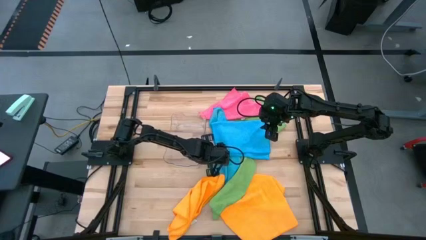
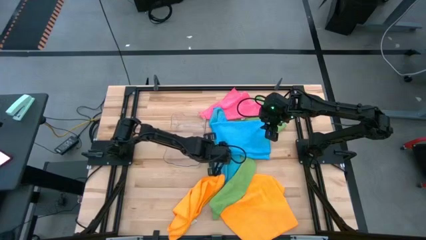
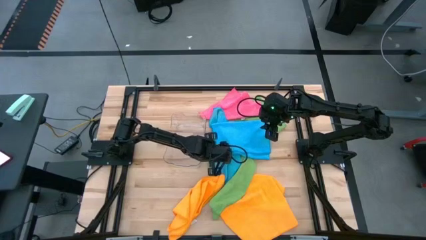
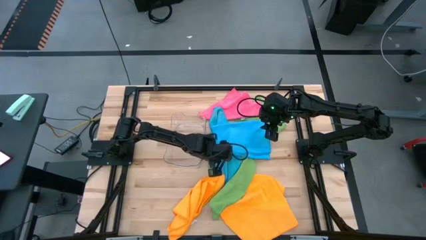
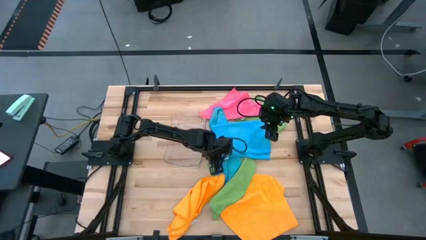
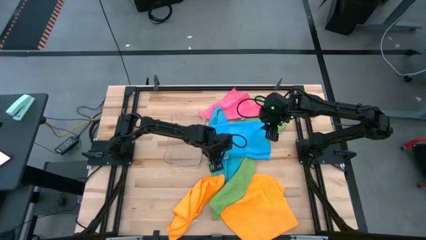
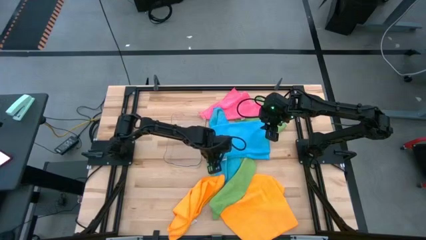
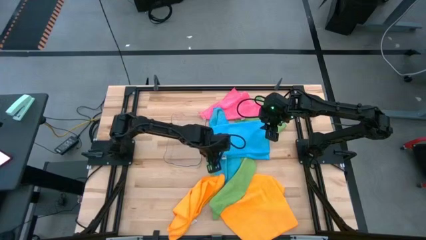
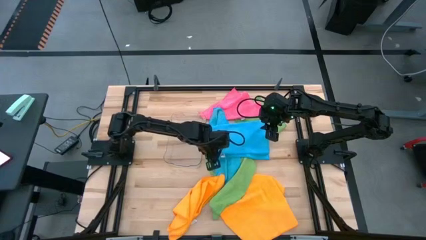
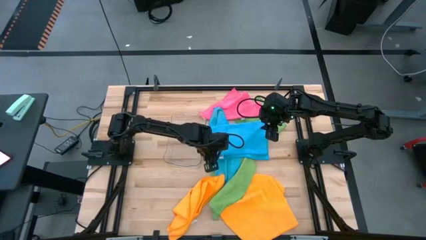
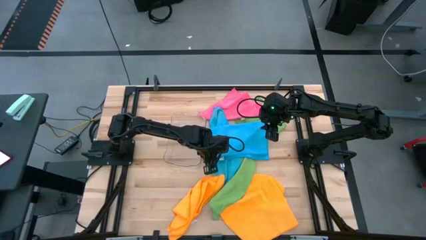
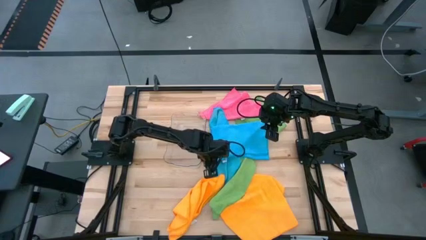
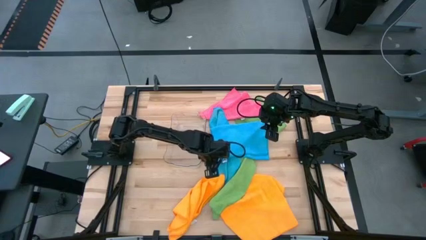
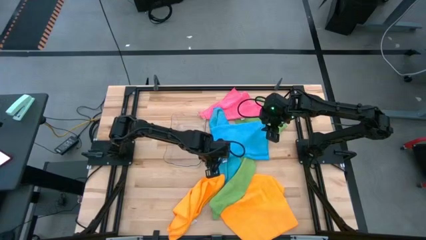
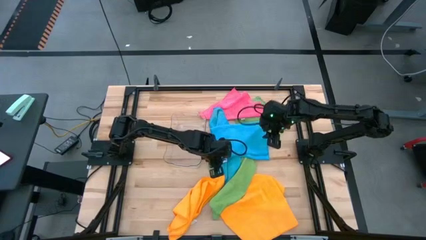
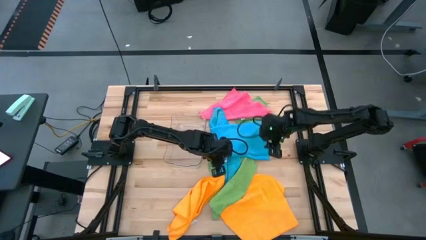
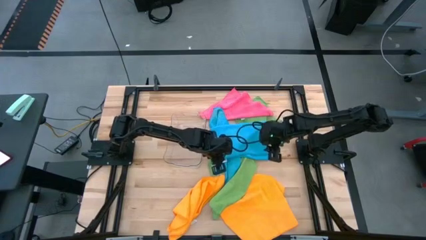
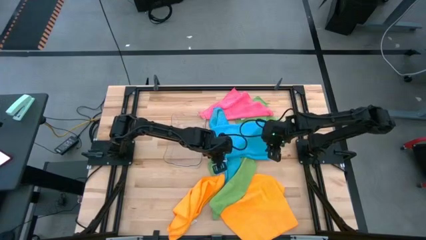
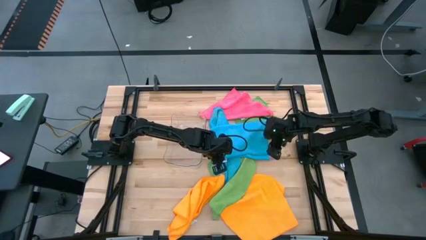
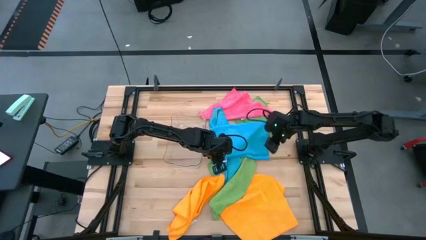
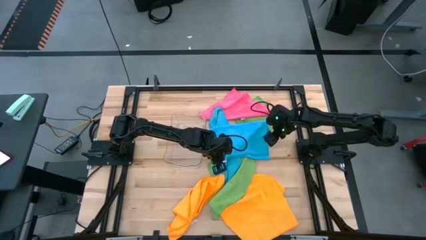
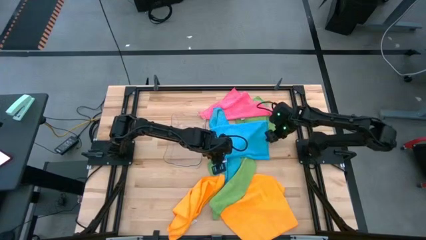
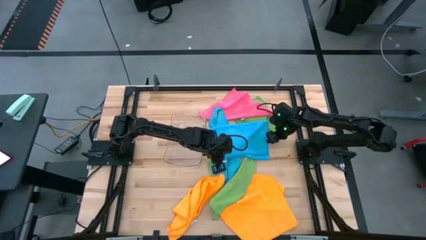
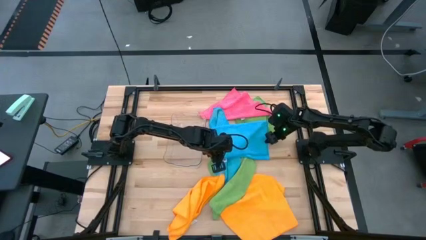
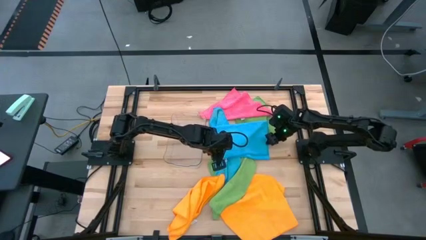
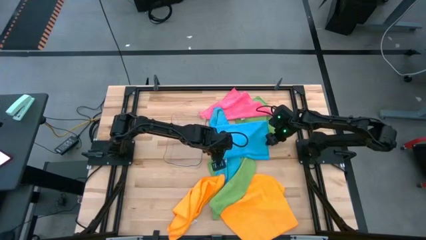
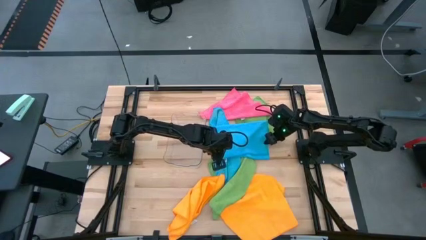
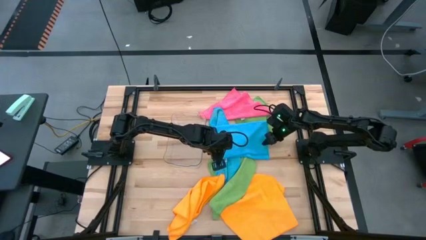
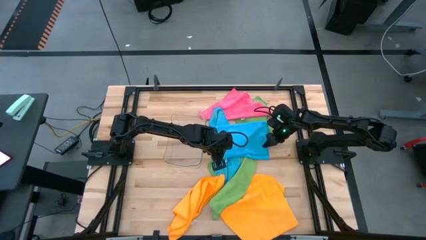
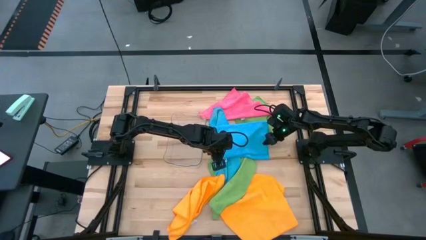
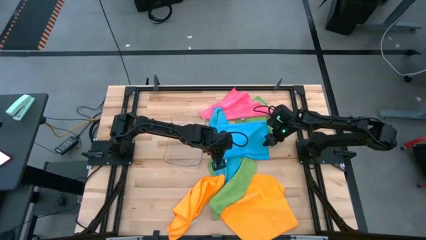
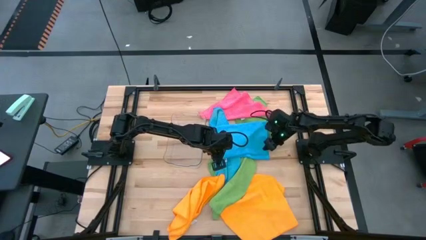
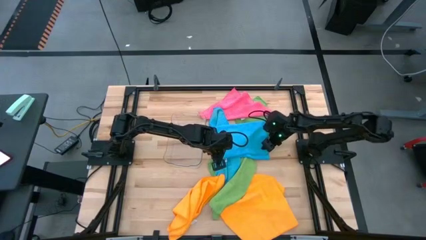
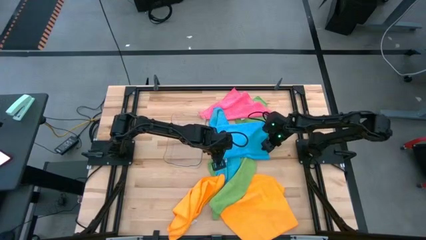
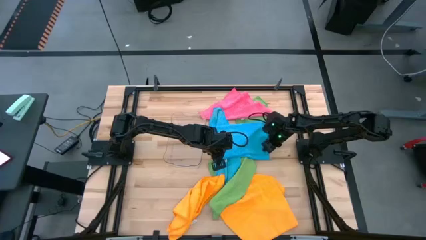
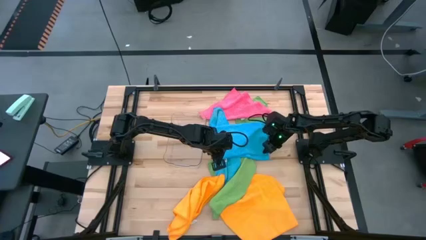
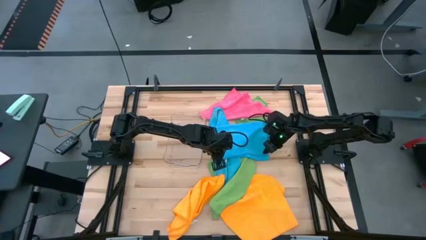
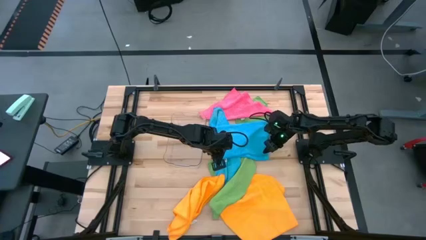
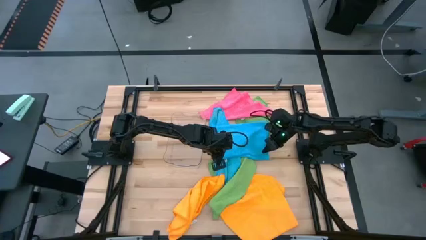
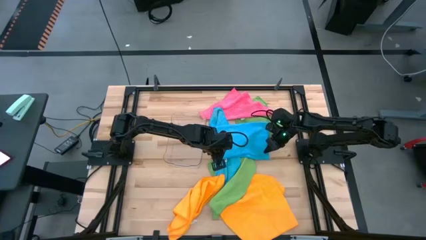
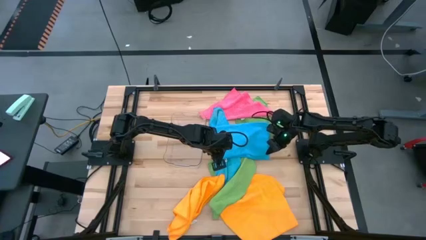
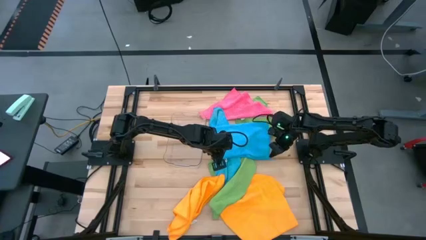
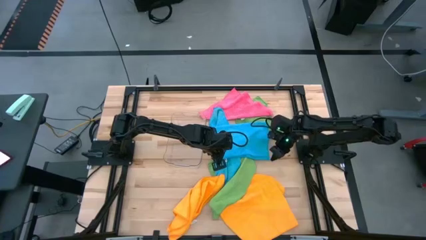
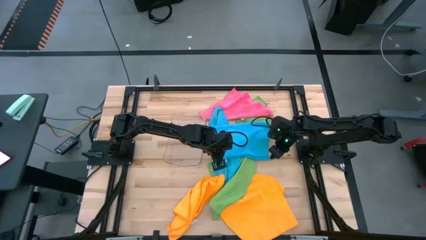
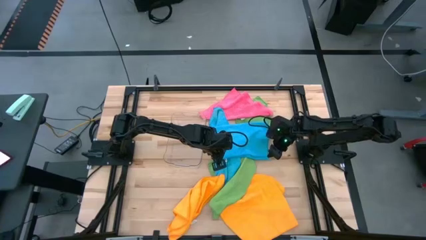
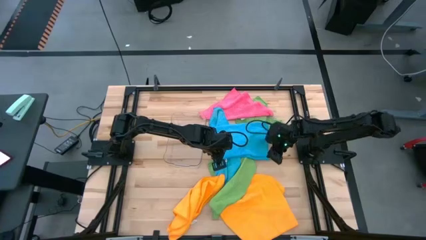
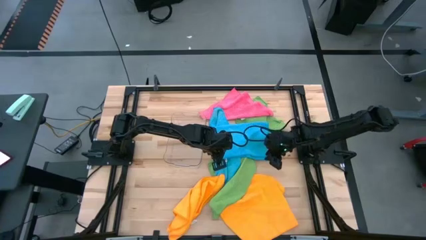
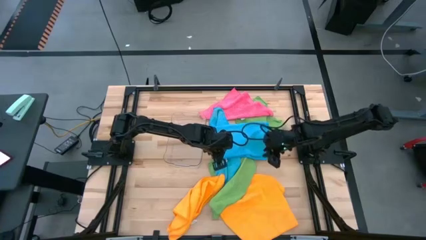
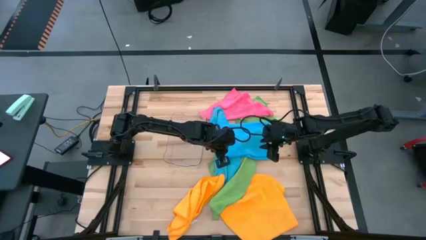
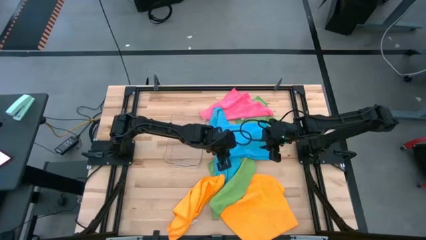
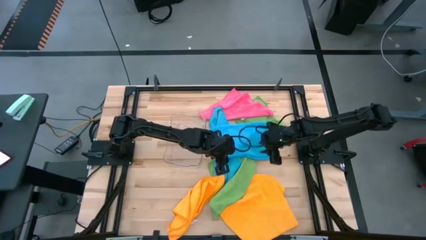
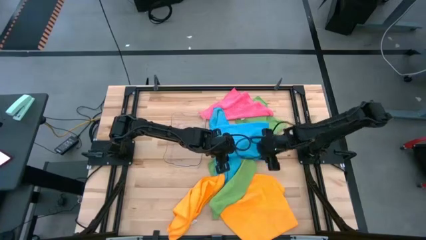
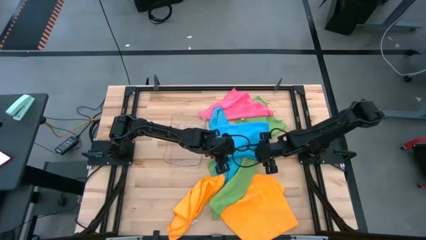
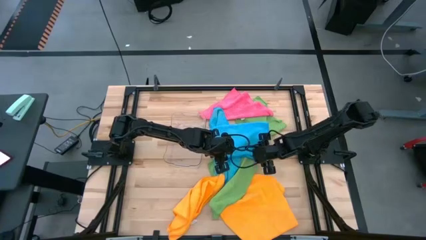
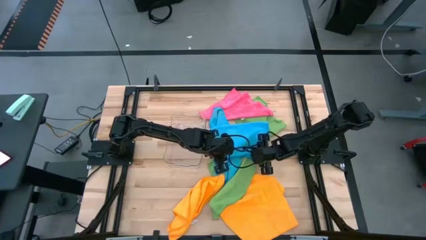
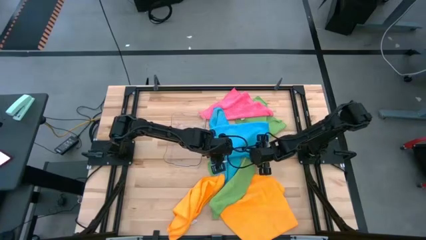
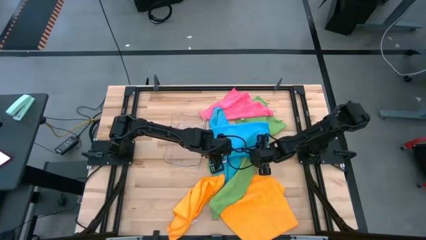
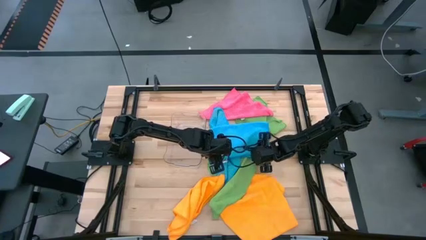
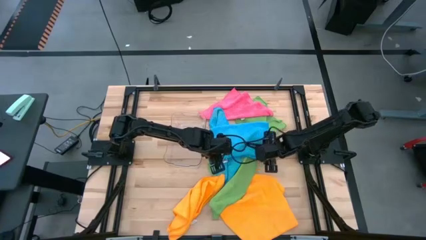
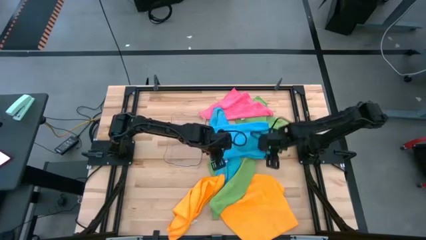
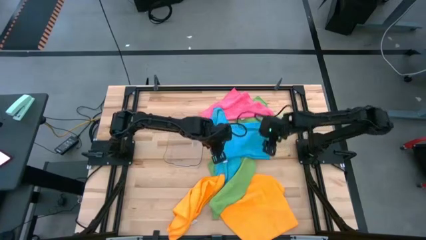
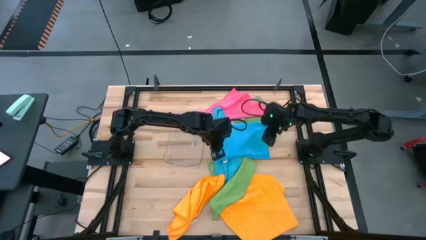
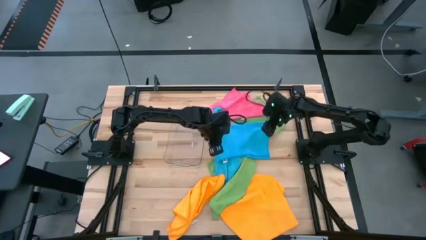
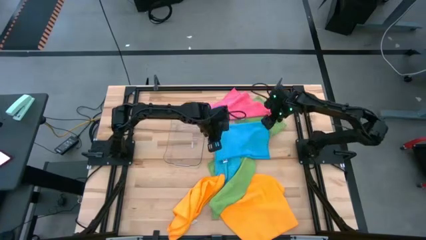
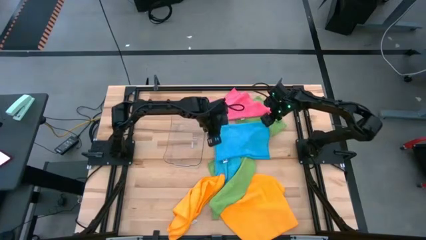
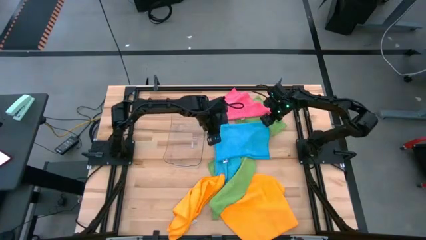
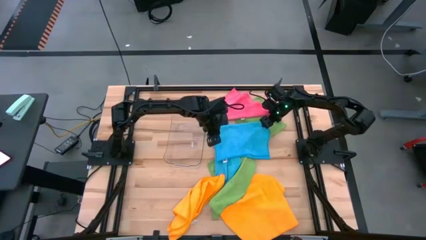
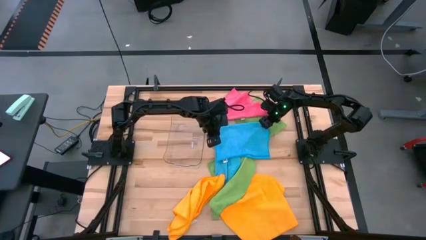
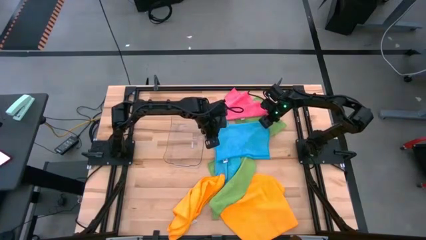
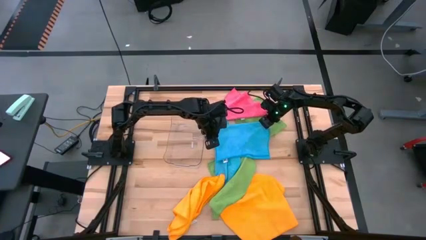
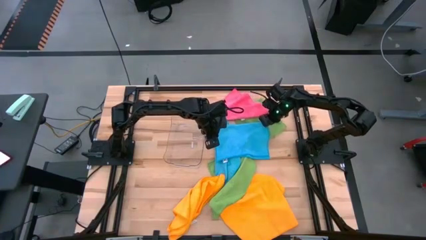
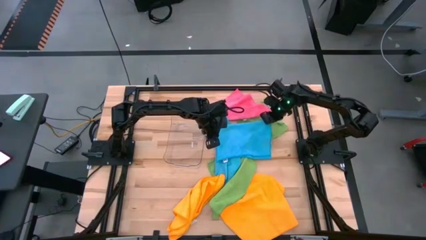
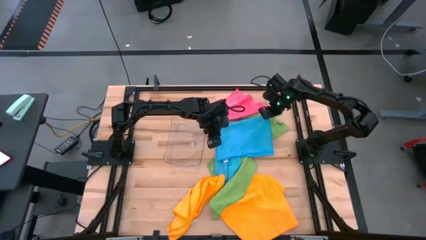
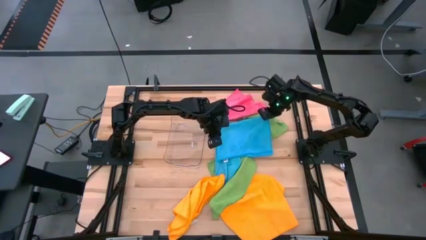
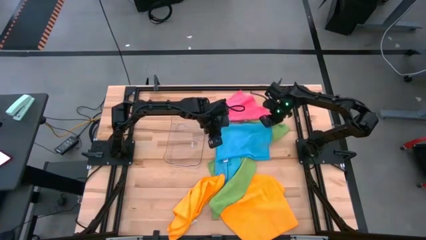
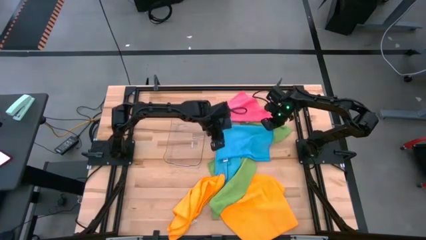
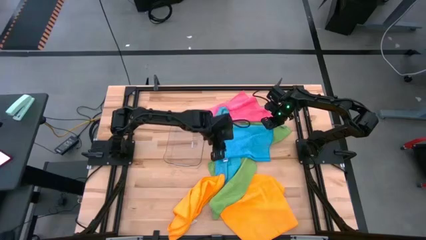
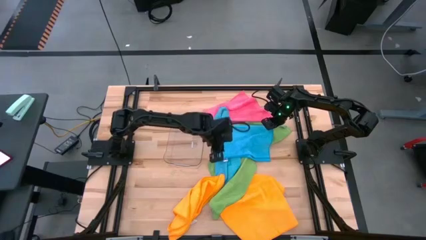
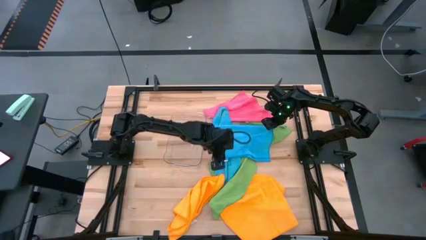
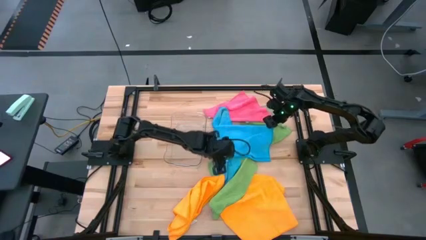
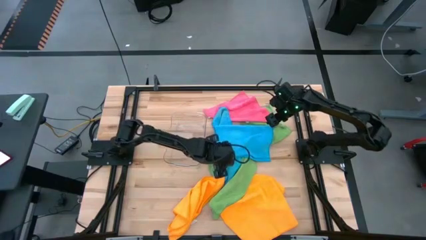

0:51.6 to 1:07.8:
Task: Fold microfiber towels
Fold the left blue towel
